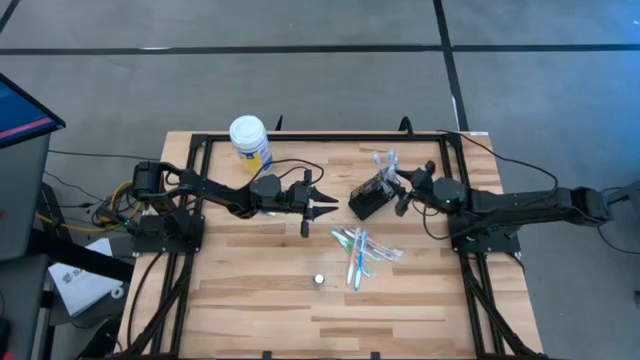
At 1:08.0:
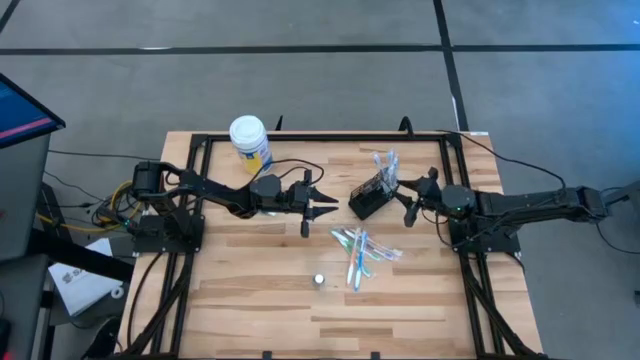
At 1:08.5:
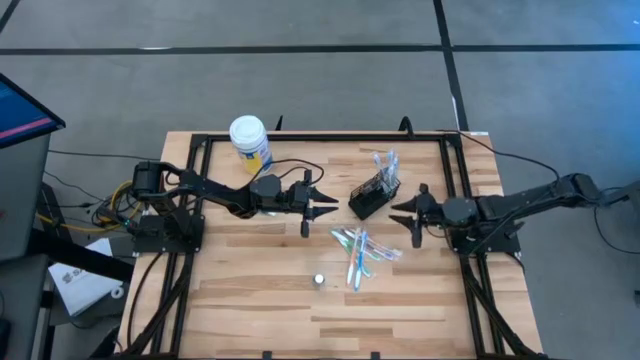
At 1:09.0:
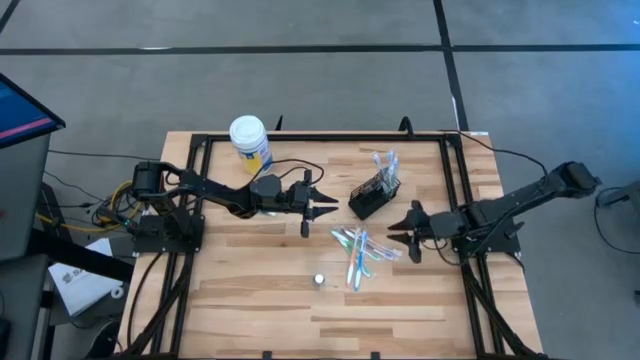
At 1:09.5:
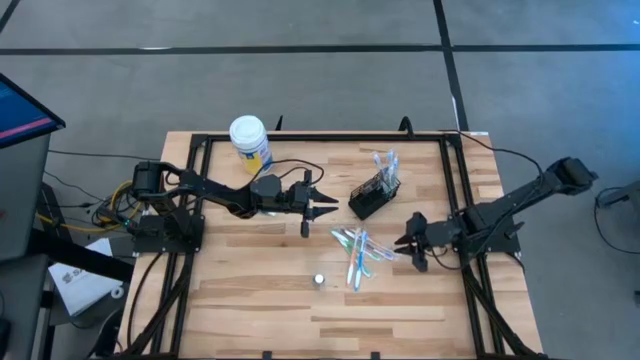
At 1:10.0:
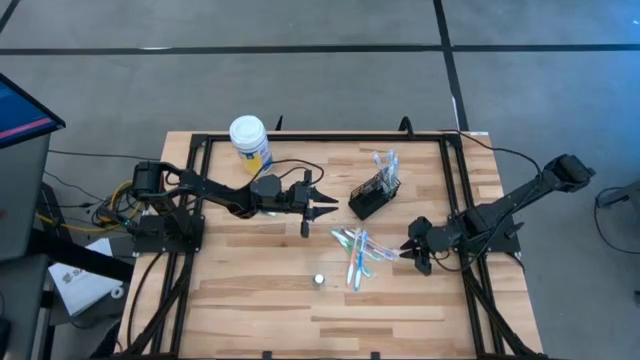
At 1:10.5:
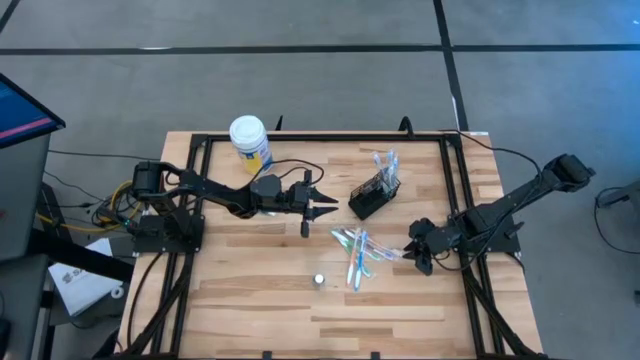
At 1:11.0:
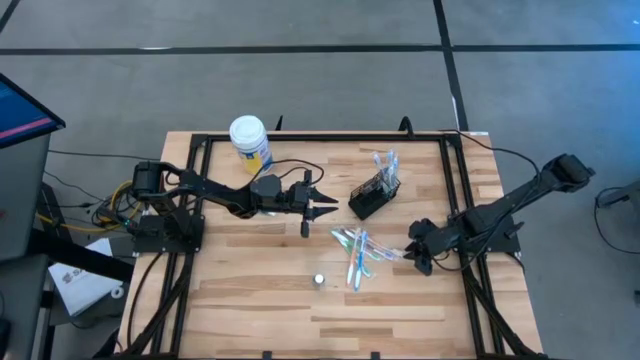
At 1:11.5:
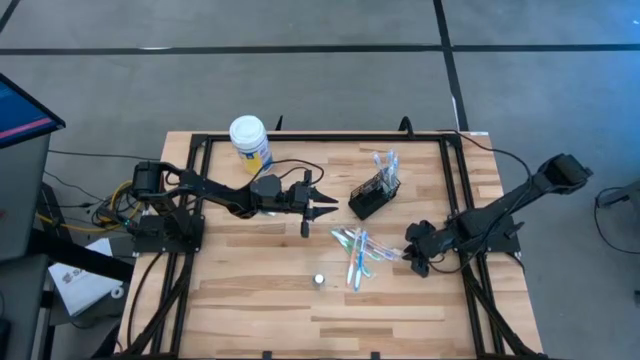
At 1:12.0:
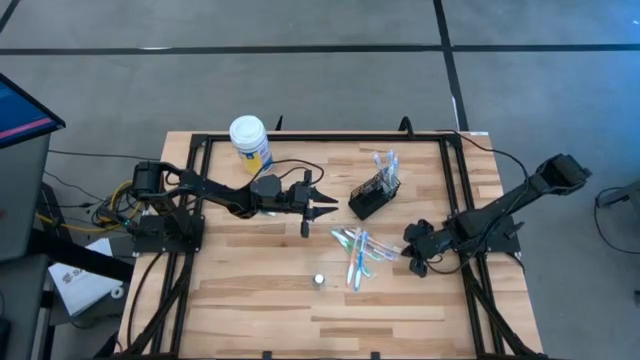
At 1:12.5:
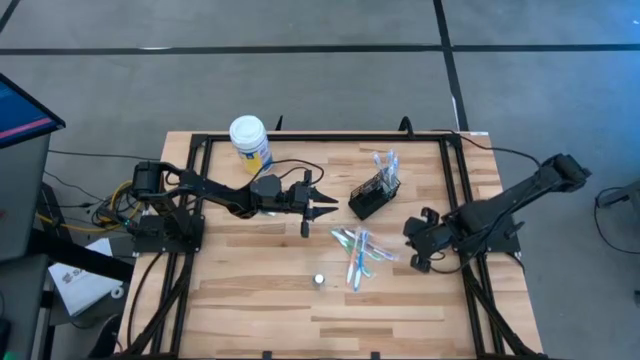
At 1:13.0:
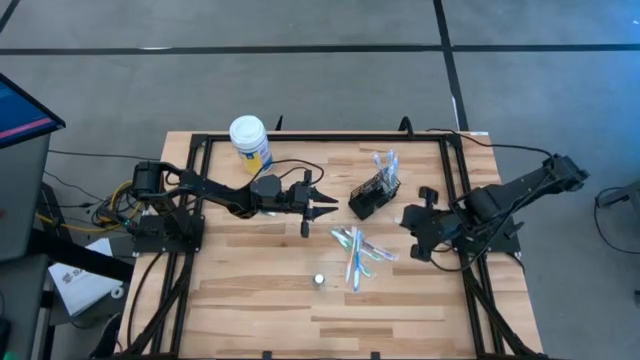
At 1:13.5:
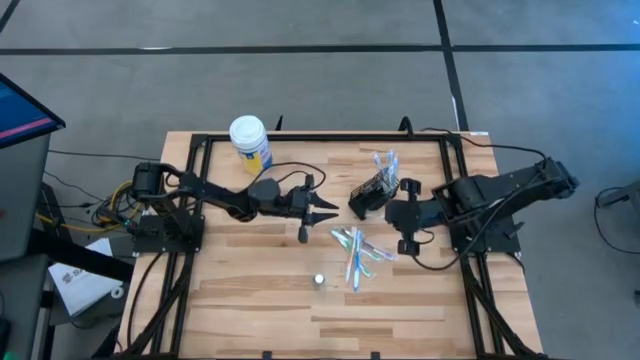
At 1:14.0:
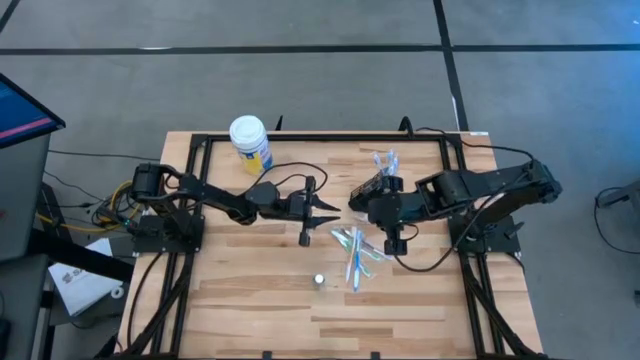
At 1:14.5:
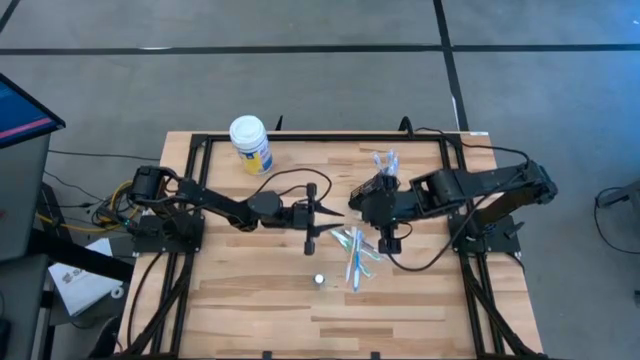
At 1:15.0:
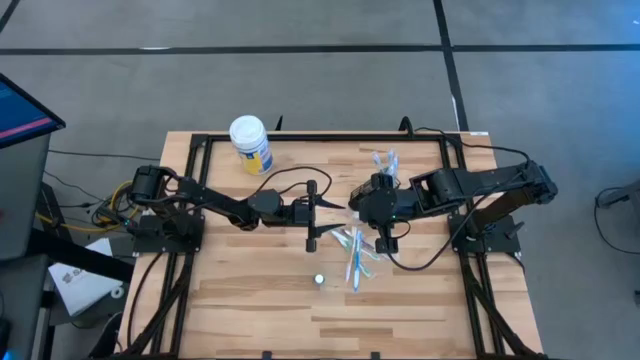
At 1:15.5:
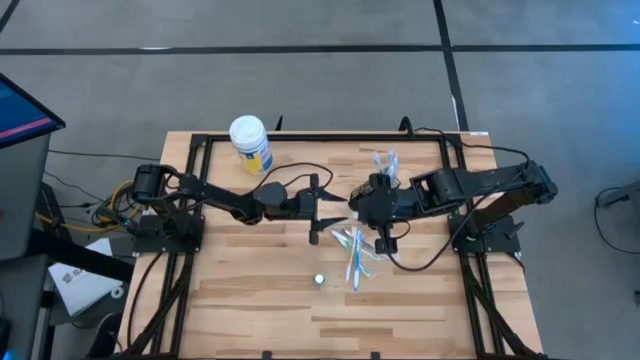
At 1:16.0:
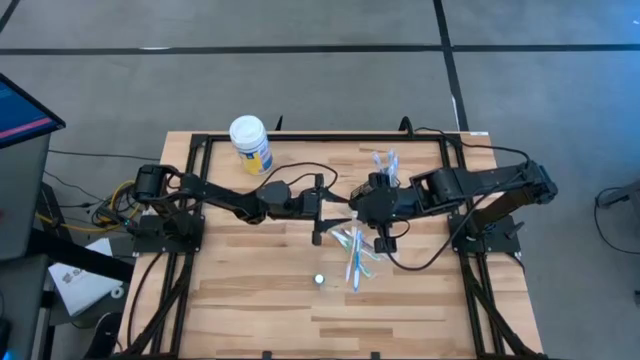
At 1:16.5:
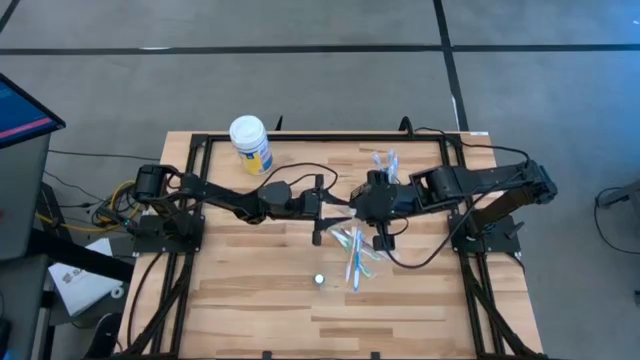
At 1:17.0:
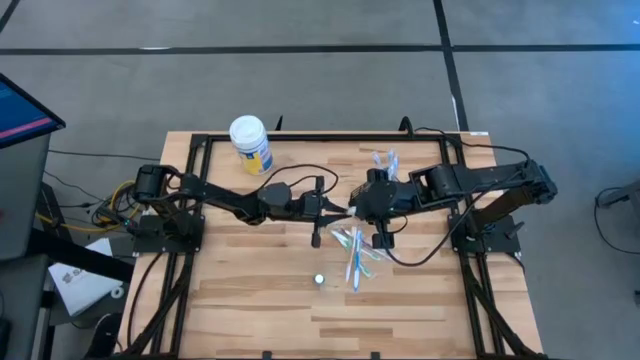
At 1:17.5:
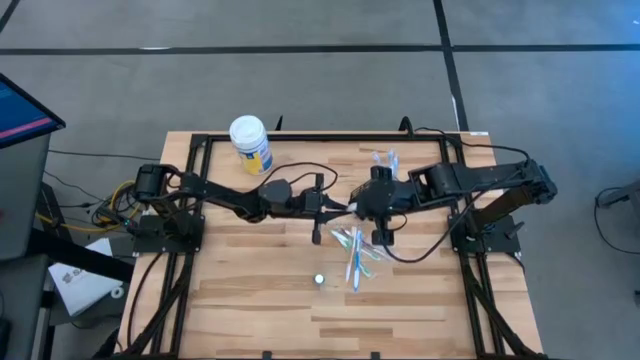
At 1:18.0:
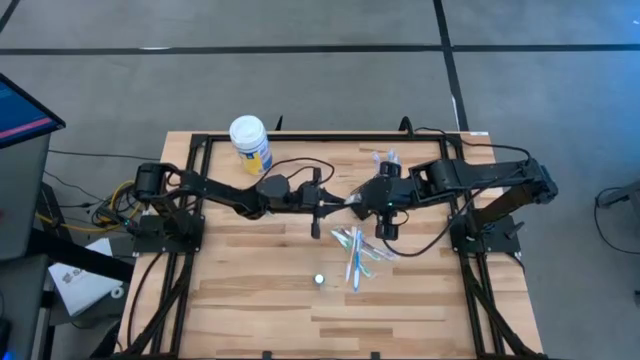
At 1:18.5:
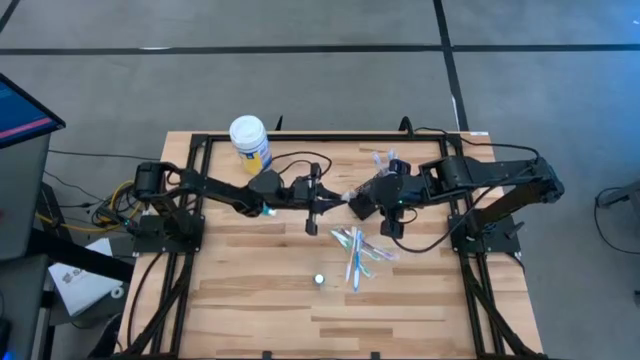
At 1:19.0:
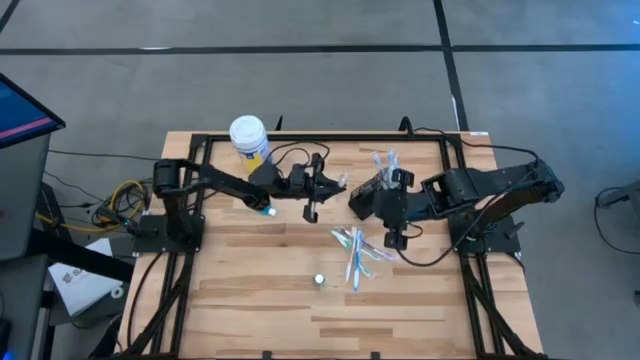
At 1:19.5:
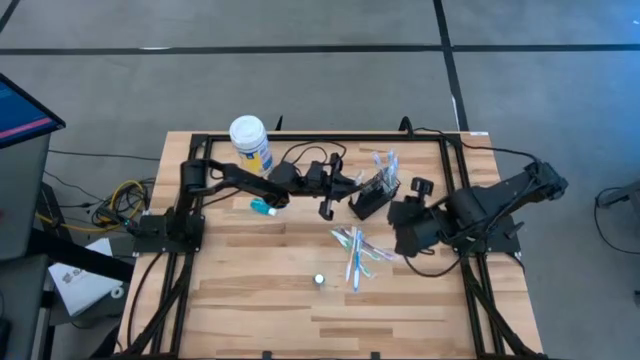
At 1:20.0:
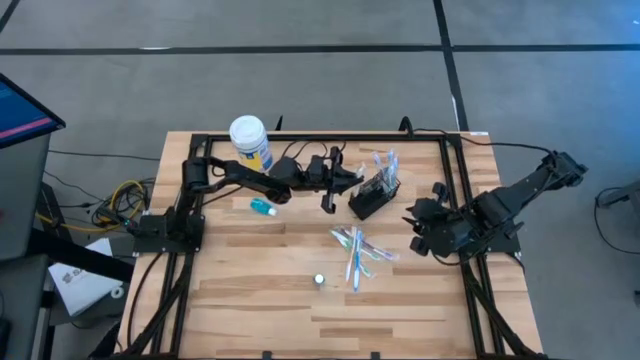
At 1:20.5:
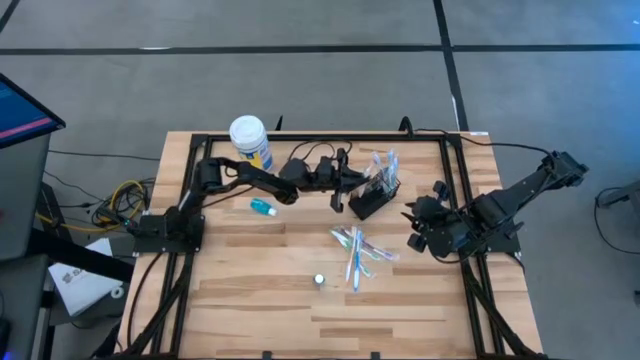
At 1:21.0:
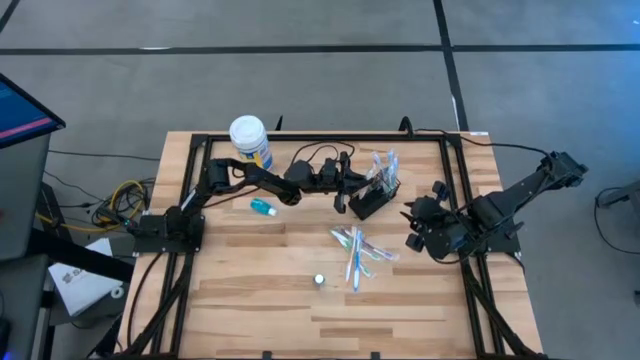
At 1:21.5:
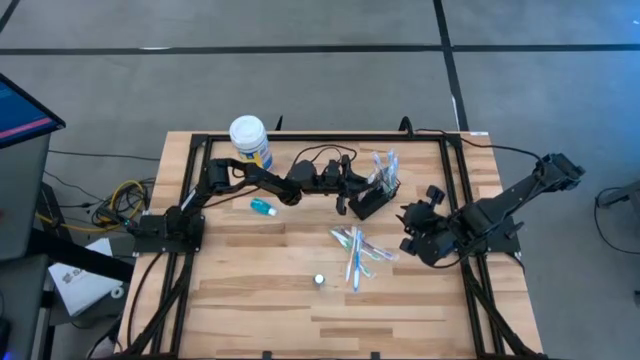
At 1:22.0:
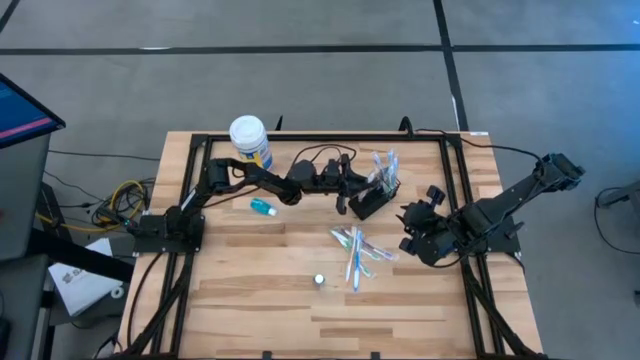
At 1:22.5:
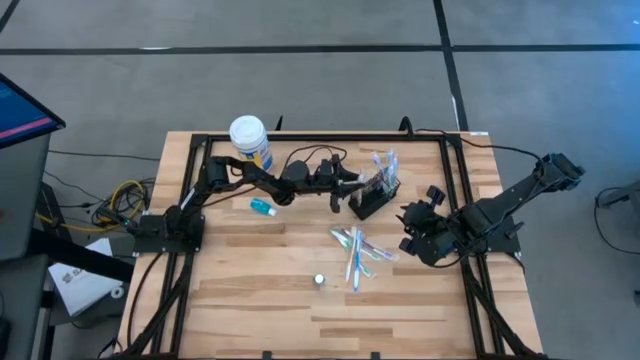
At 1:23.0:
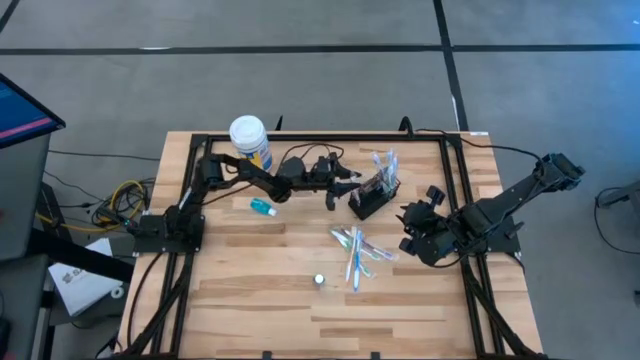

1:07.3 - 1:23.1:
Task: Pick & Place toothbrushing station
Put the orange toothbrush into the mesh organizer

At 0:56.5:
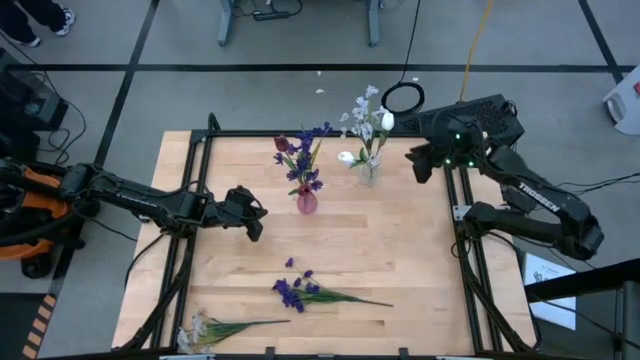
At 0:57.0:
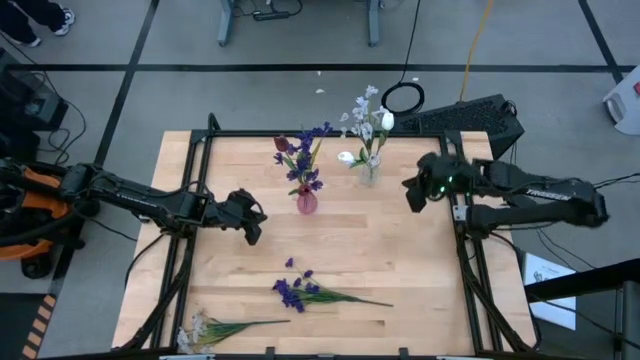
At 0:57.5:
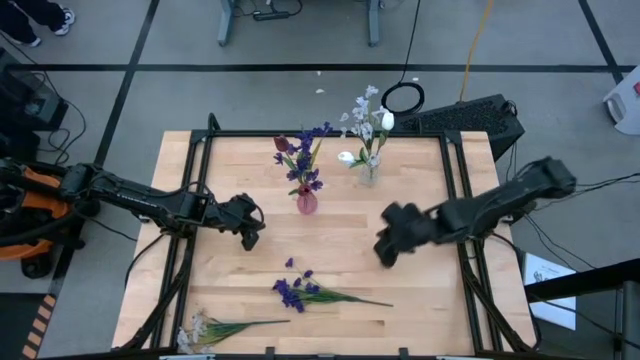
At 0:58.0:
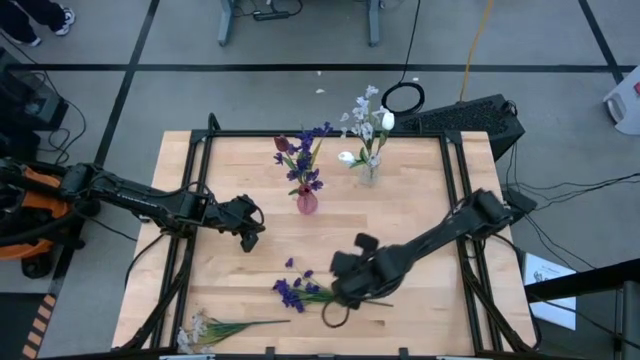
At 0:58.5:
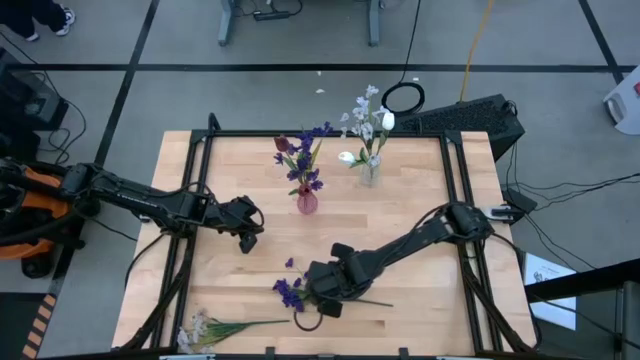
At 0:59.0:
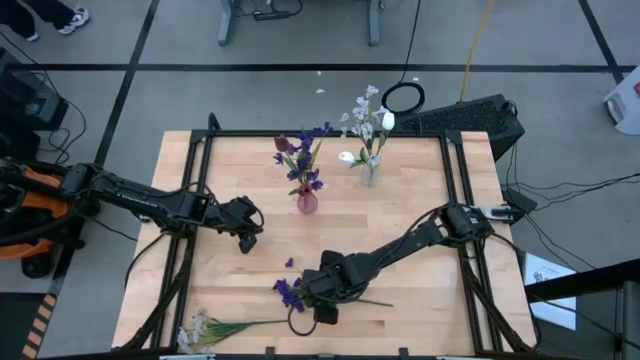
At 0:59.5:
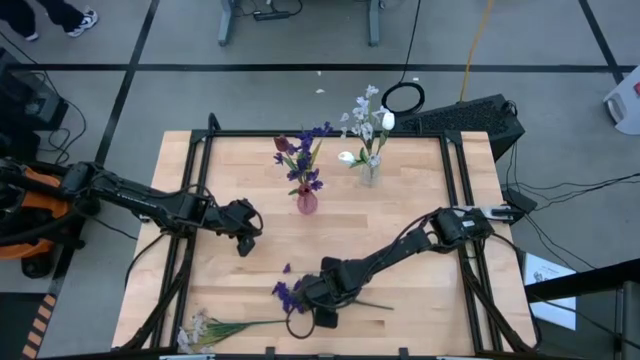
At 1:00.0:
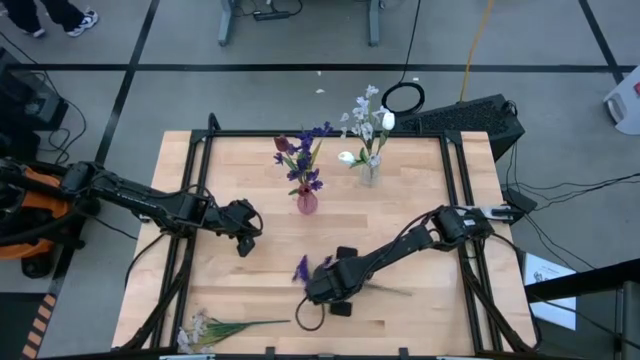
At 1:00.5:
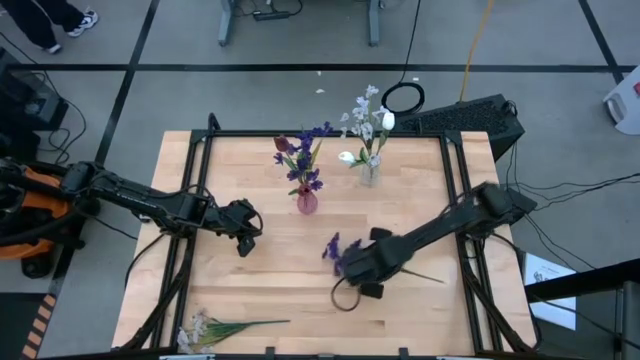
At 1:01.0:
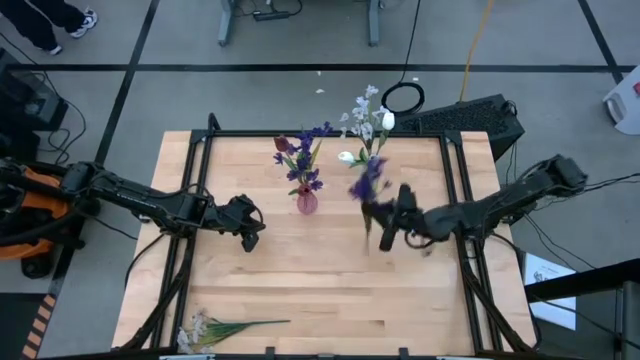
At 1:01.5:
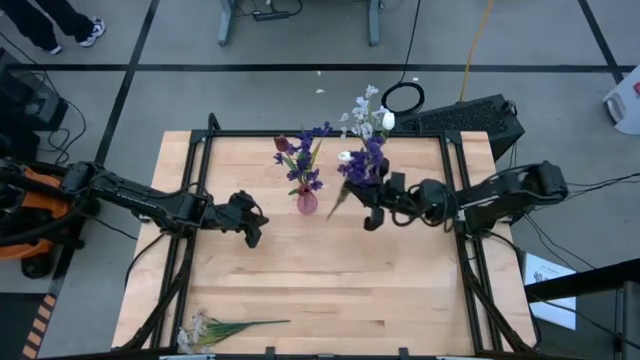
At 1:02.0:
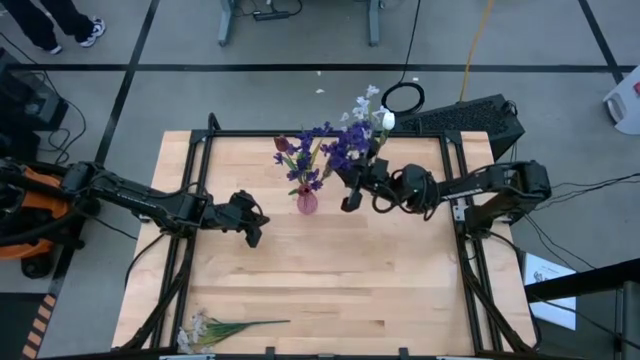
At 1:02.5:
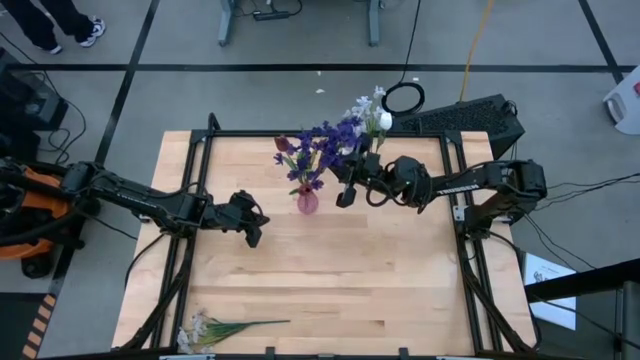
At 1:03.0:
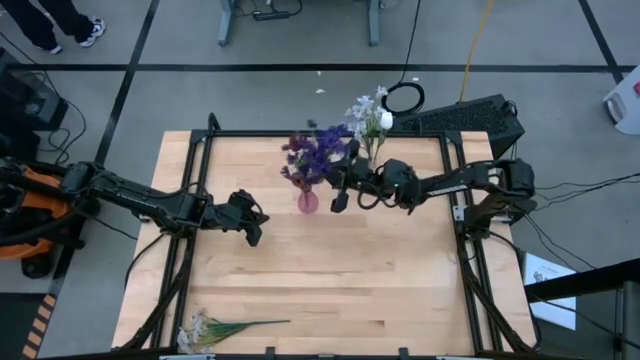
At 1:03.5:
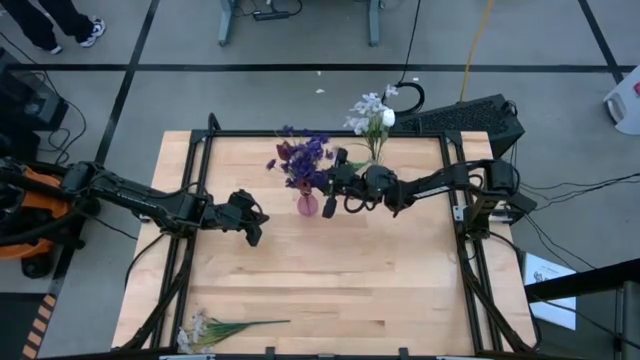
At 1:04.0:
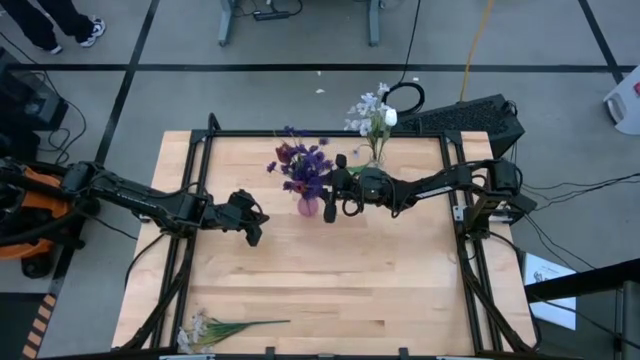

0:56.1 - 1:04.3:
Task: Sort flowers into vase by color
Put the purple flowers into the transparent purple vase
